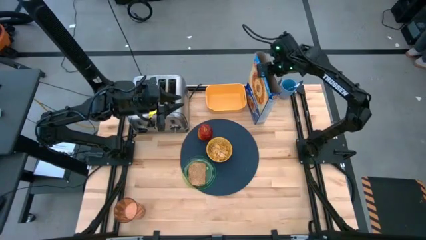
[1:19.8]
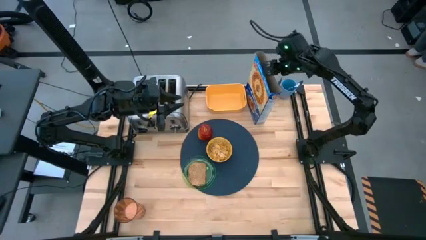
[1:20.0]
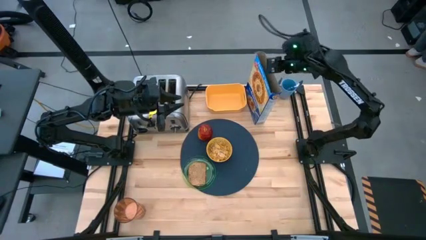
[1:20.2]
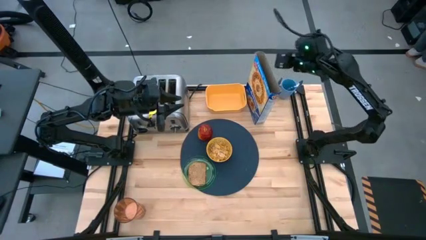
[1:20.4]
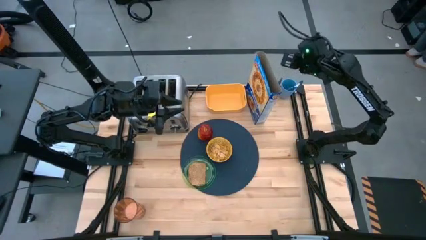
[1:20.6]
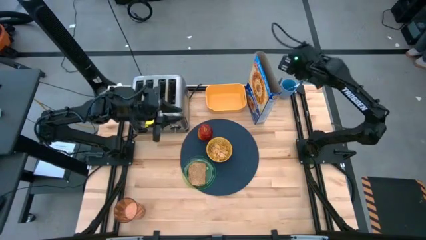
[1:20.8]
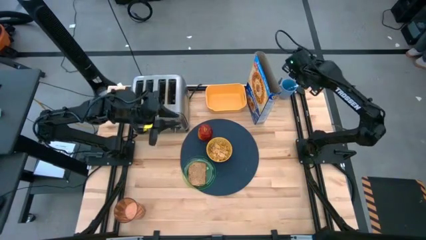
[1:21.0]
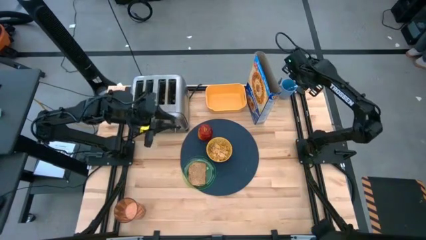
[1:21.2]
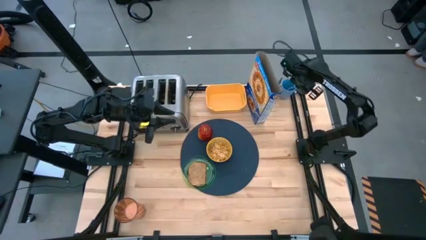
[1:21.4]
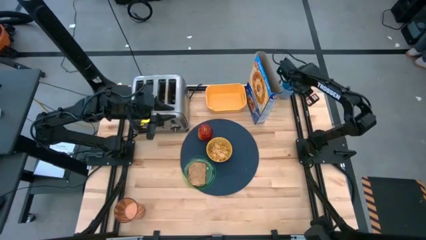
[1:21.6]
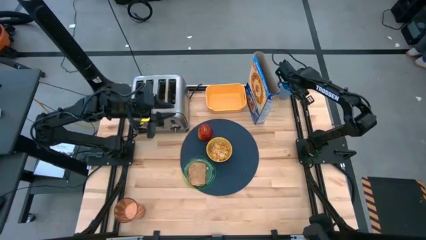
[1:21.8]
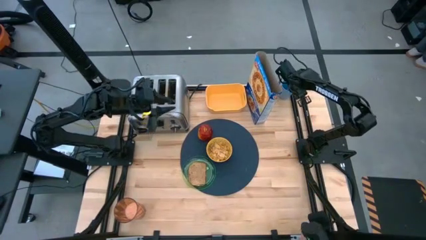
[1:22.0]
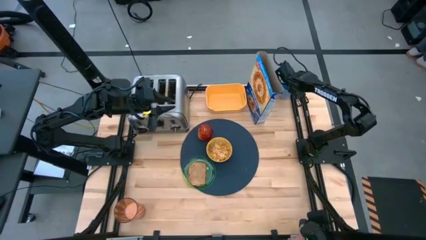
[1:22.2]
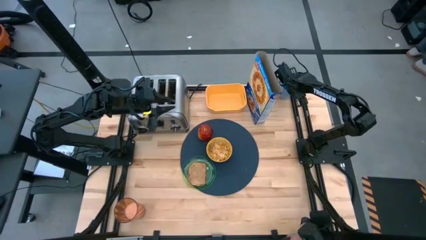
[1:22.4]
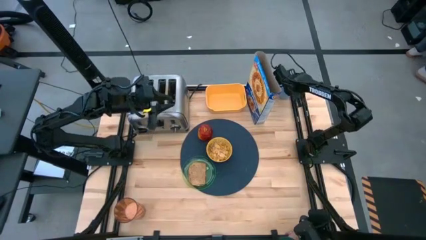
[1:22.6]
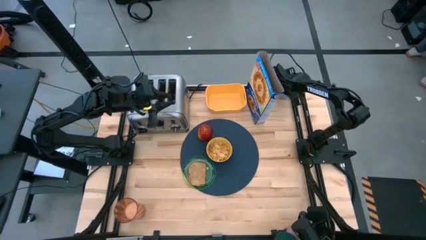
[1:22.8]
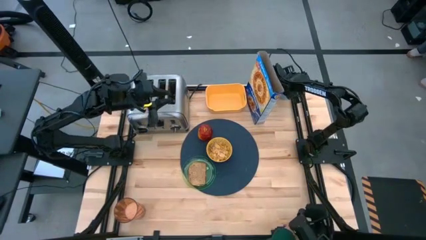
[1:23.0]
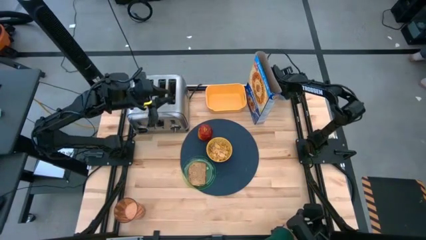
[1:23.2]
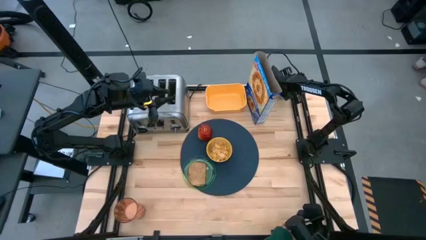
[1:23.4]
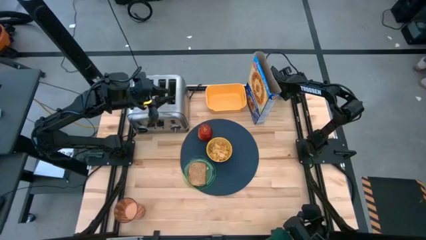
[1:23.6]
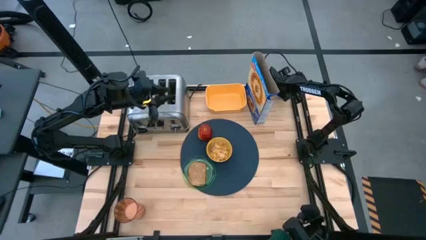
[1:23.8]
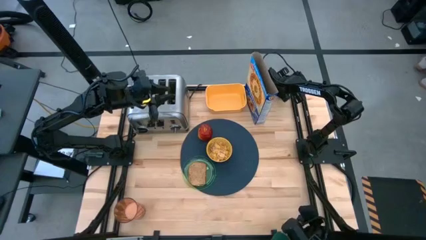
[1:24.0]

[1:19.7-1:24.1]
Task: Arrange a breakfast setting
Put the purple spoon on the table mat to the right of the yellow bowl

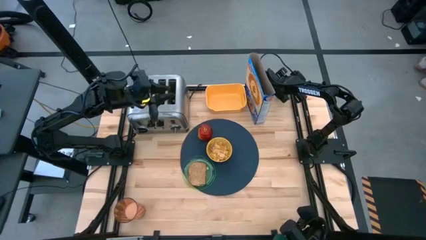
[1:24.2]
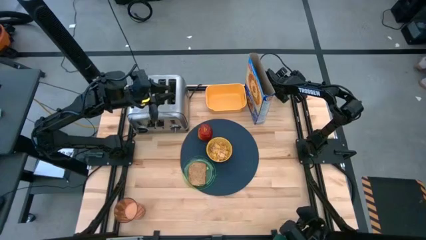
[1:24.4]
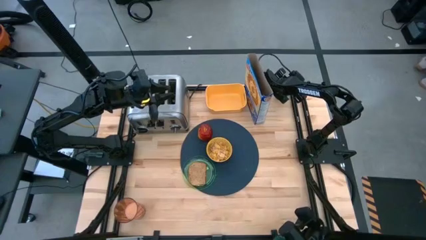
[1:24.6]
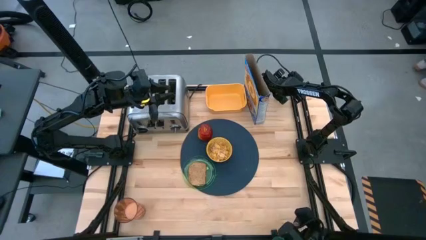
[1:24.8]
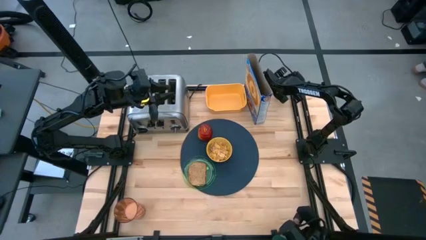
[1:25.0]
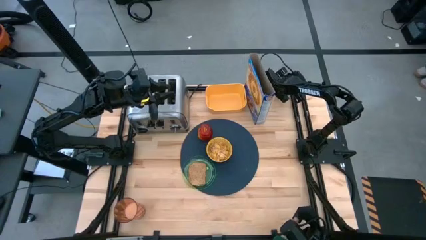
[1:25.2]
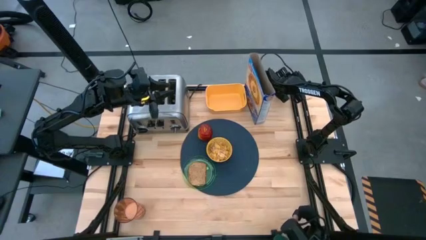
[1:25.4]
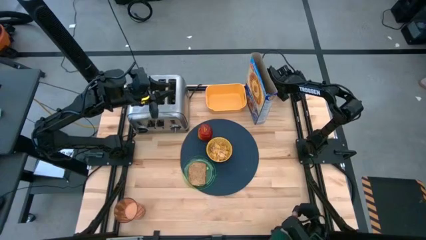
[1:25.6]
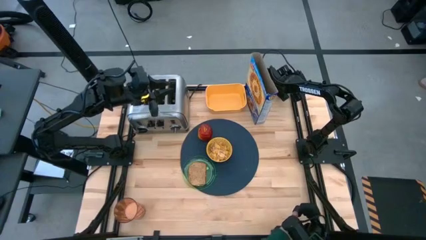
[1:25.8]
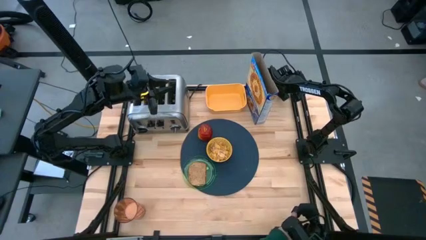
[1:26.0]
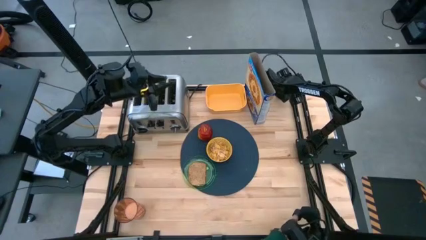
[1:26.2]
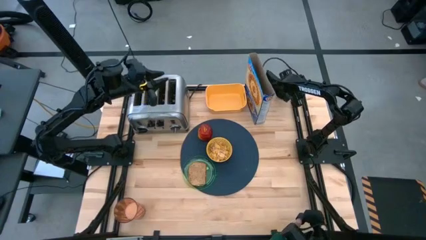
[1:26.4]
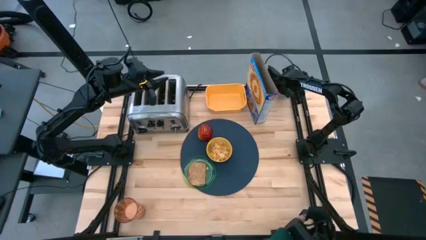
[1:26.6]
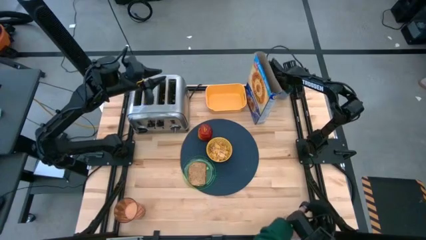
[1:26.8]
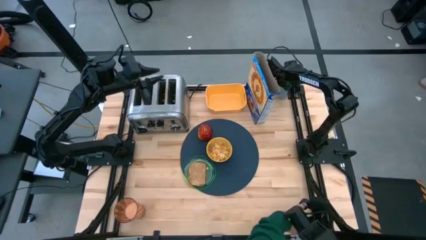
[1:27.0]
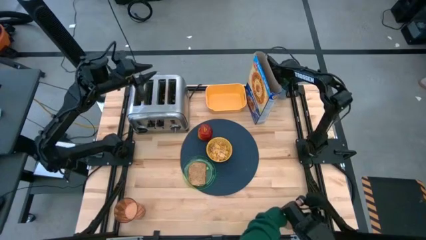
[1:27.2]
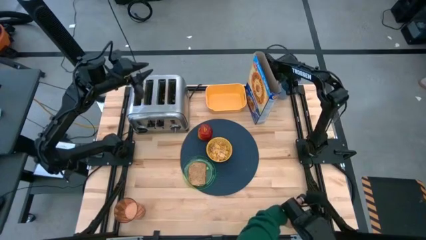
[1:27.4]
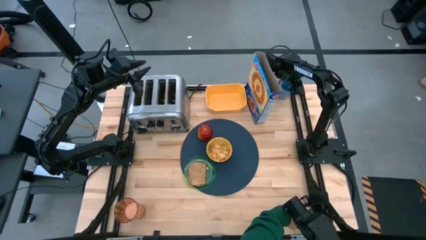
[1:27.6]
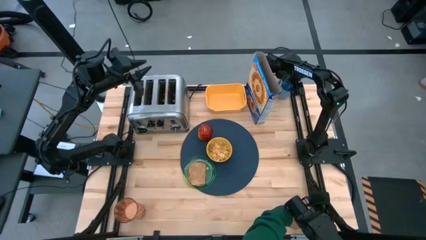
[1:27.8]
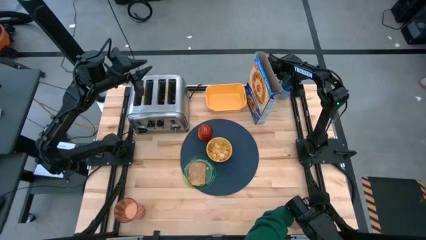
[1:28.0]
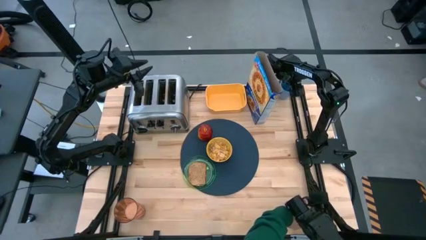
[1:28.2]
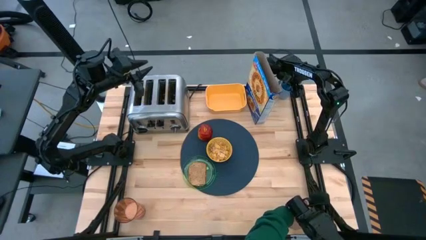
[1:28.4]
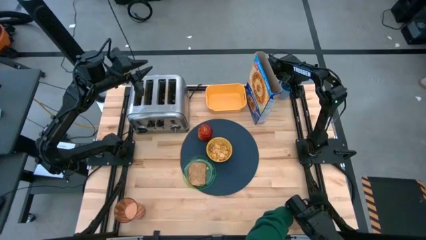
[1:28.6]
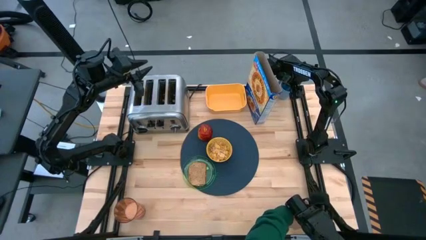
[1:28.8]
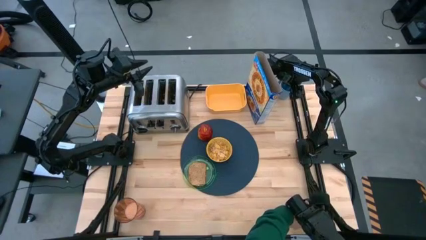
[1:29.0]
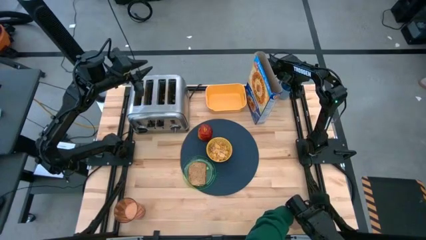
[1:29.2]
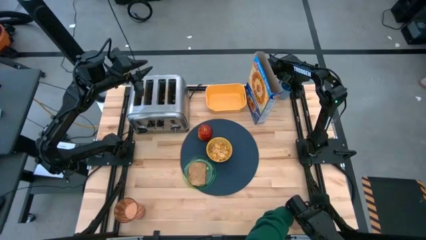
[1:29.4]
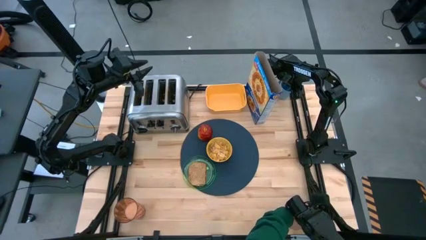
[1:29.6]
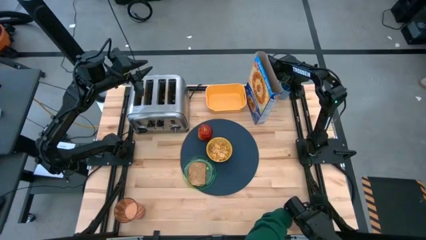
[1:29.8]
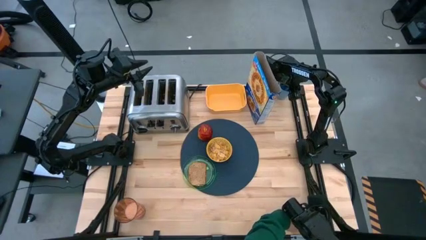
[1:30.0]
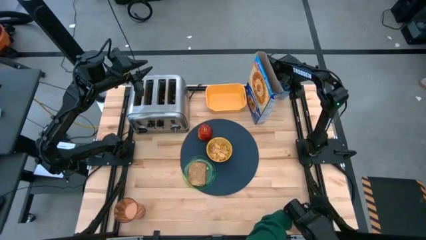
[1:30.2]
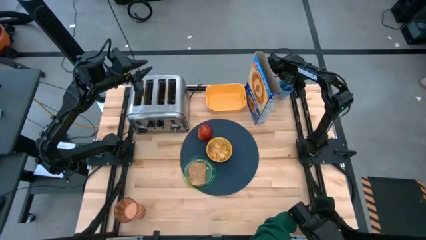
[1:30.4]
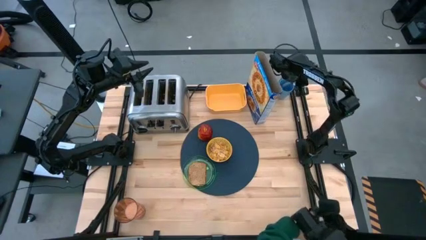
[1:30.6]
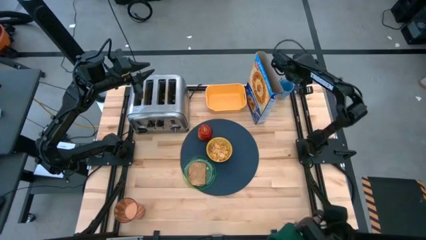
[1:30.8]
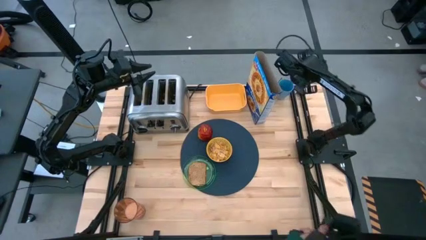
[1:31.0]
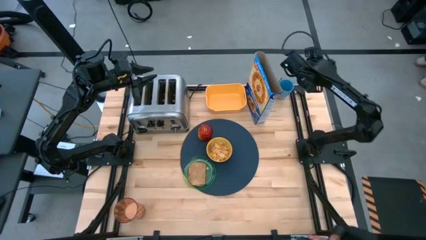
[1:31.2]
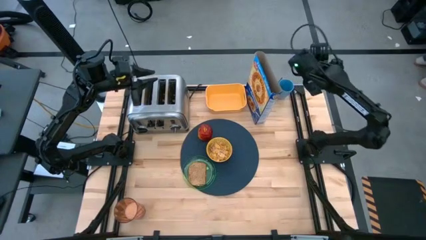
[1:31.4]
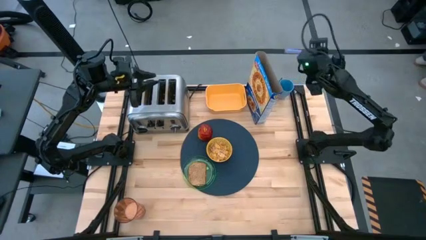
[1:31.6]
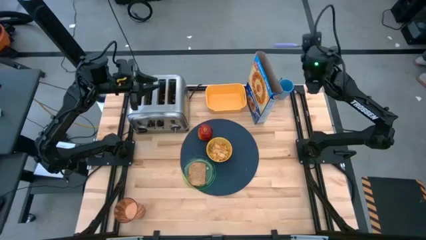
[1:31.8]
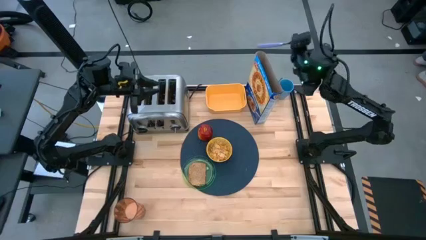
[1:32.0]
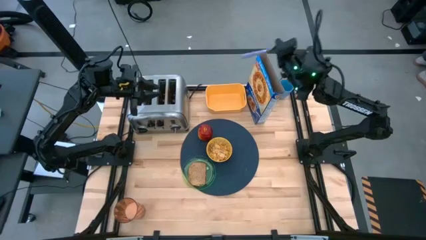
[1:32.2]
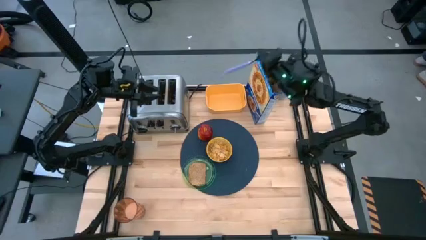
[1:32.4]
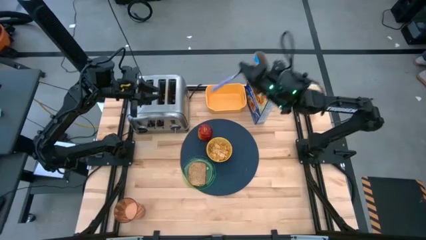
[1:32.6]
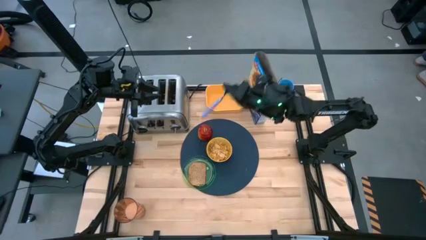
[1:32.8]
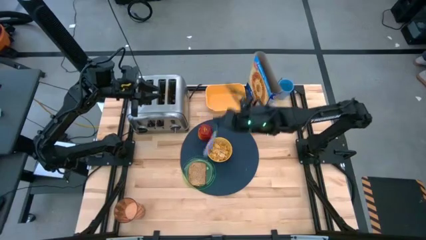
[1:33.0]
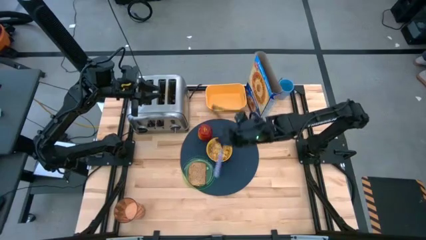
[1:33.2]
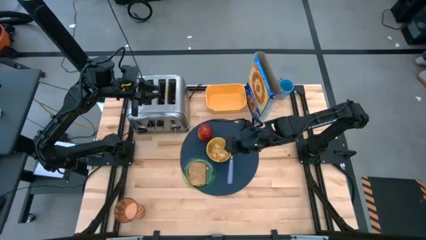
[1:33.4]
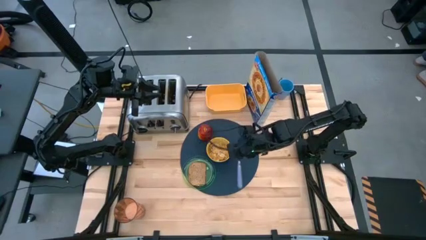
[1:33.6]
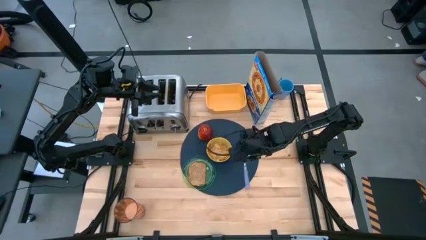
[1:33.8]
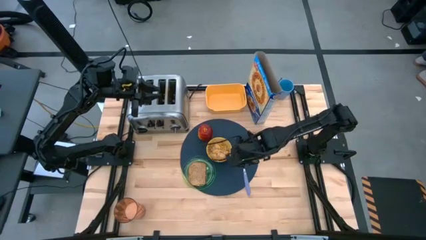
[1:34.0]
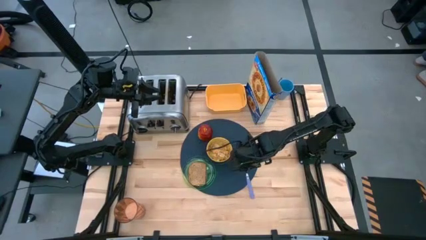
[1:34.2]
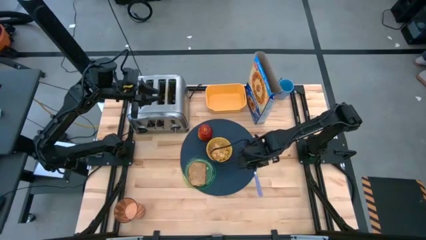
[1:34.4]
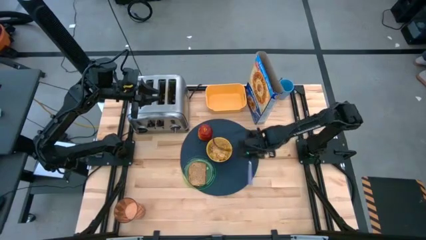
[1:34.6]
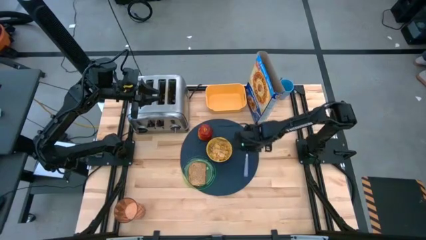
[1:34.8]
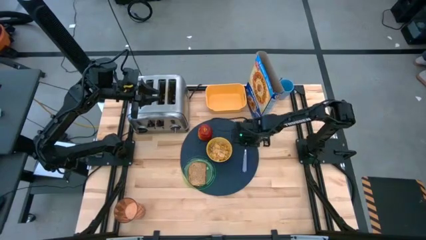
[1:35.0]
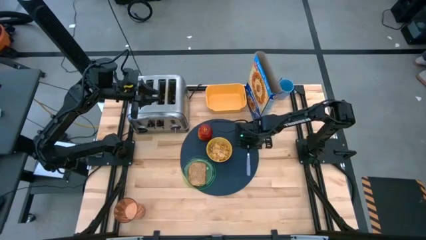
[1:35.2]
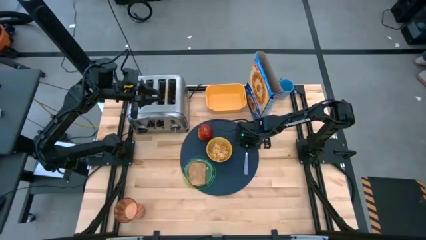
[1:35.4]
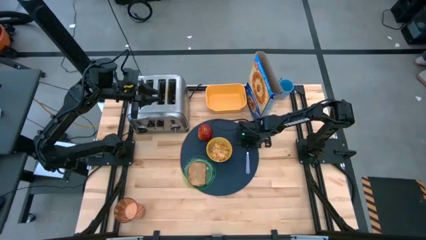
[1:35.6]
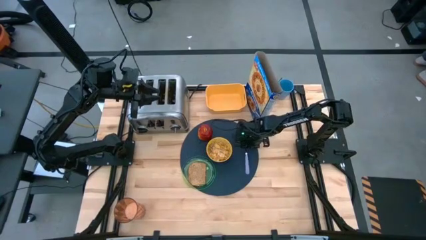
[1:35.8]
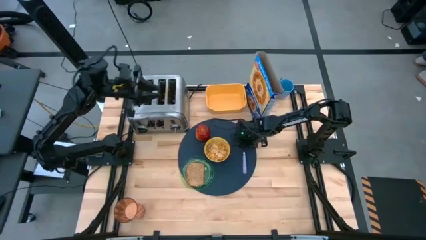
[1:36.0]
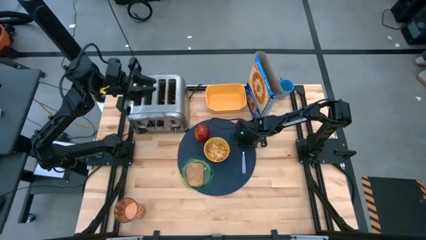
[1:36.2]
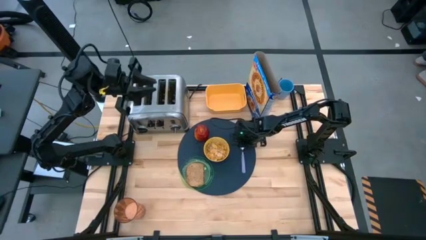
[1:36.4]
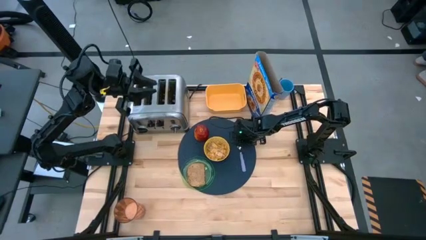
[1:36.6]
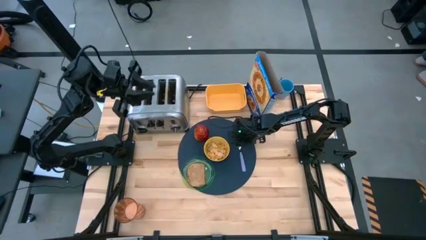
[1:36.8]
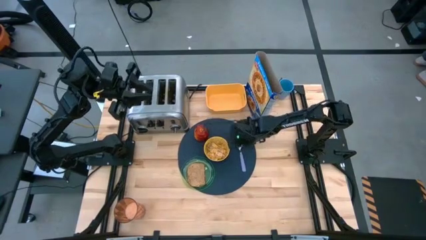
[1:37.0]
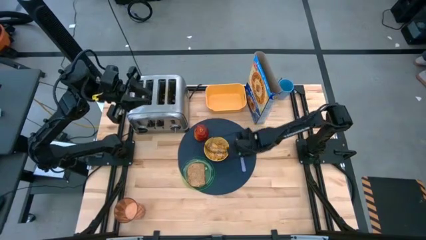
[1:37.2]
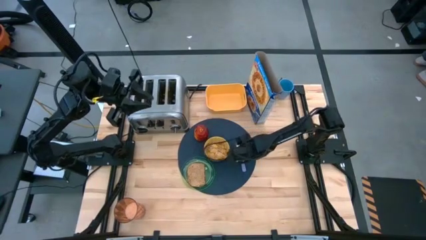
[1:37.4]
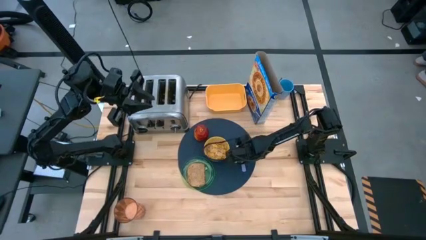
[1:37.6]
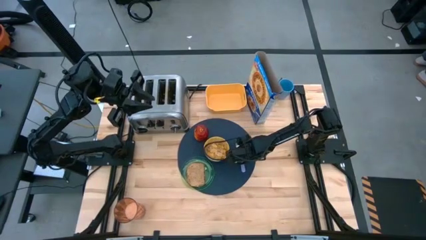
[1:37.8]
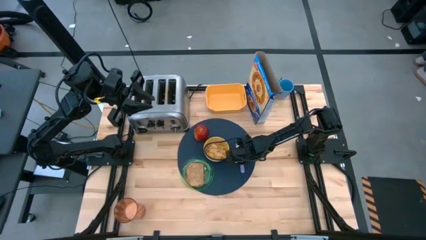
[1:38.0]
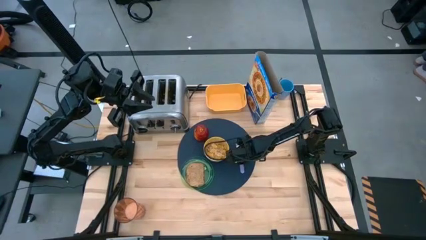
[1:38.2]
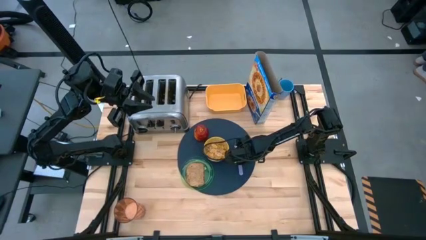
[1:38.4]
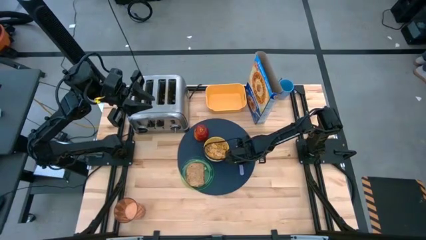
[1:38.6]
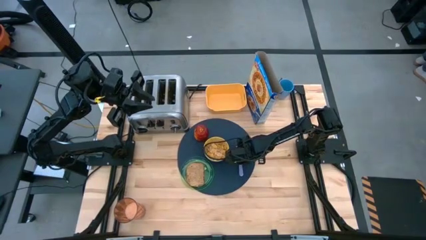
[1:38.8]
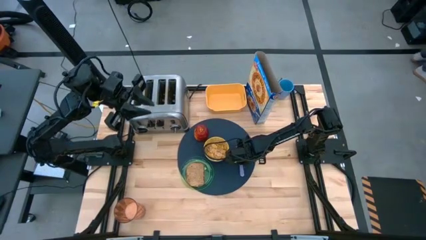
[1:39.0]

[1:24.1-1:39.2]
Put the purple spoon on the table mat to the right of the yellow bowl
